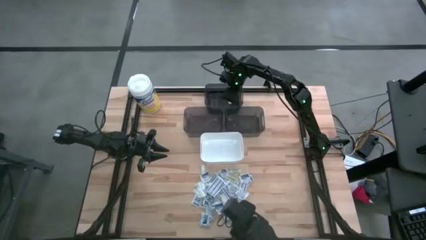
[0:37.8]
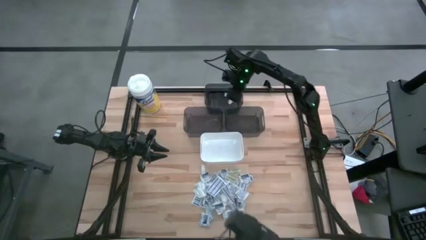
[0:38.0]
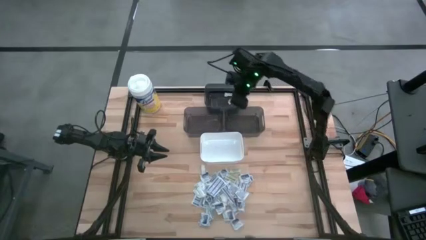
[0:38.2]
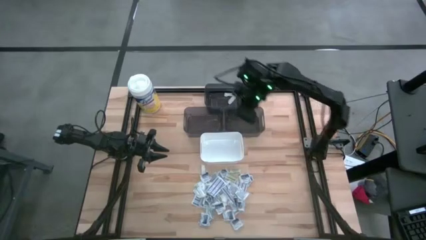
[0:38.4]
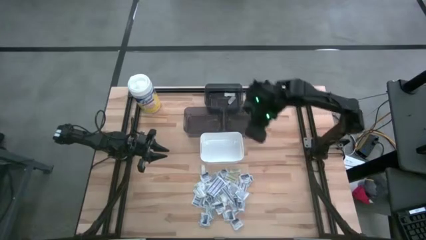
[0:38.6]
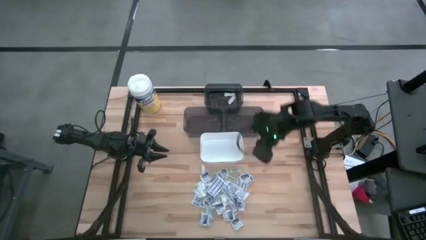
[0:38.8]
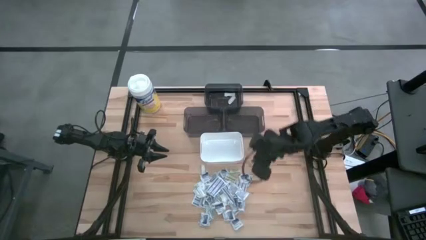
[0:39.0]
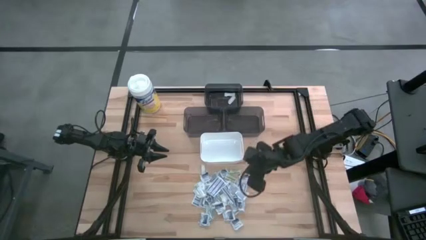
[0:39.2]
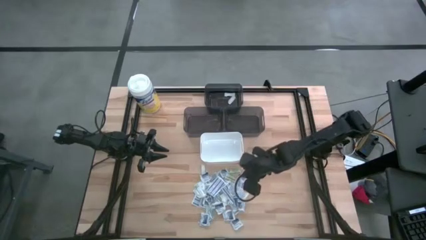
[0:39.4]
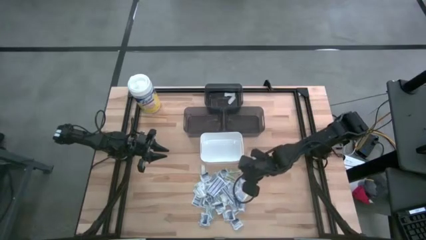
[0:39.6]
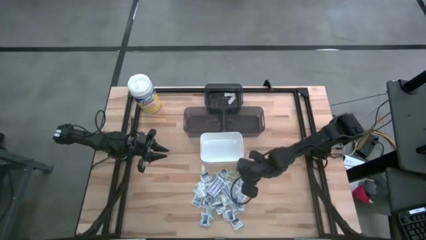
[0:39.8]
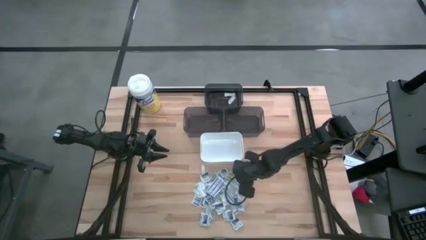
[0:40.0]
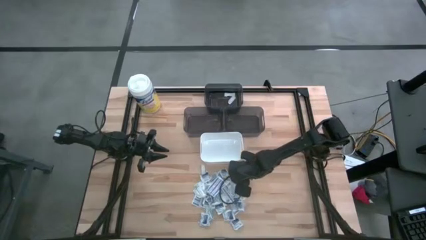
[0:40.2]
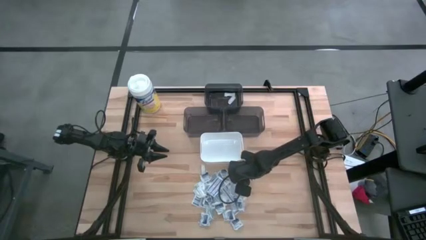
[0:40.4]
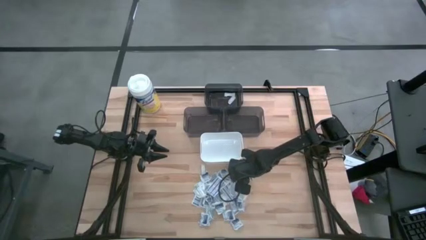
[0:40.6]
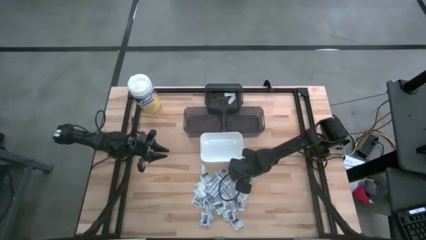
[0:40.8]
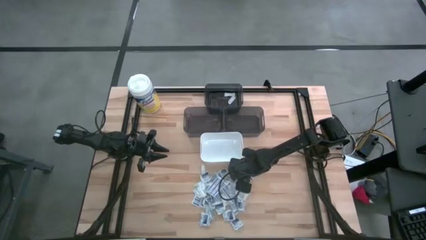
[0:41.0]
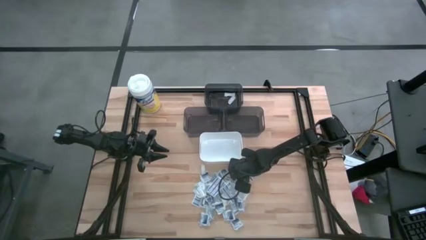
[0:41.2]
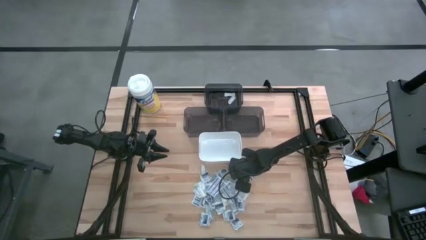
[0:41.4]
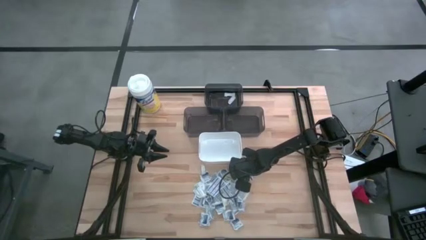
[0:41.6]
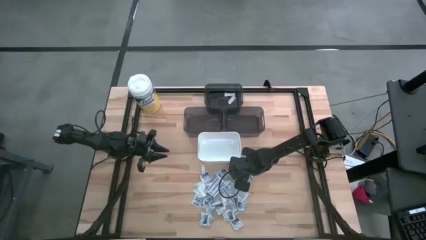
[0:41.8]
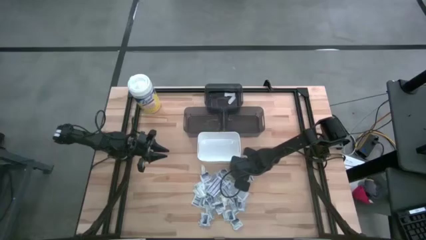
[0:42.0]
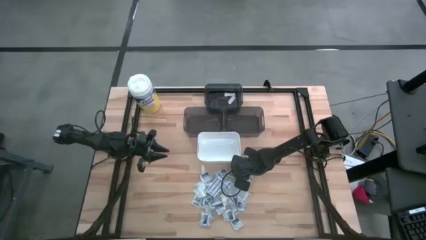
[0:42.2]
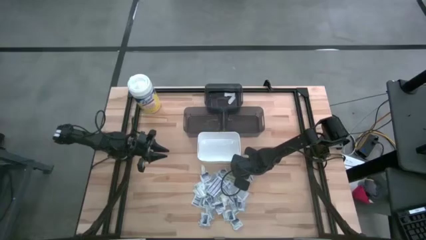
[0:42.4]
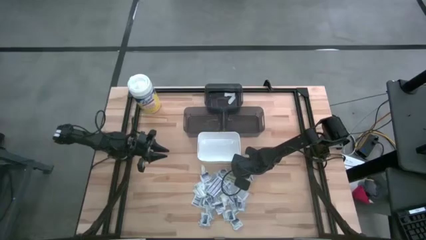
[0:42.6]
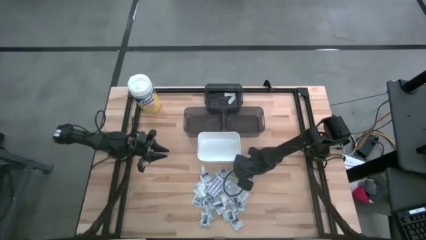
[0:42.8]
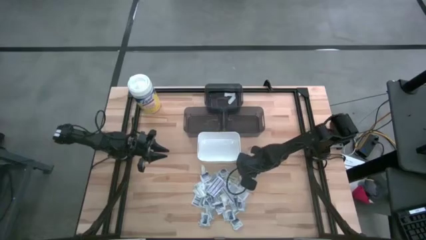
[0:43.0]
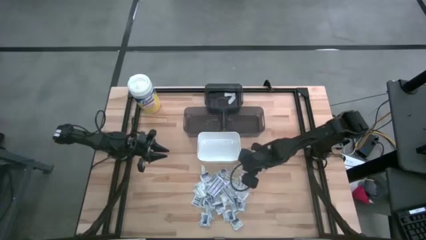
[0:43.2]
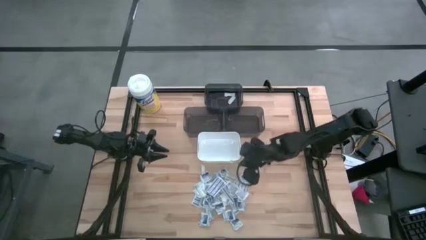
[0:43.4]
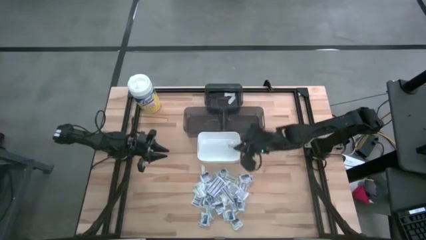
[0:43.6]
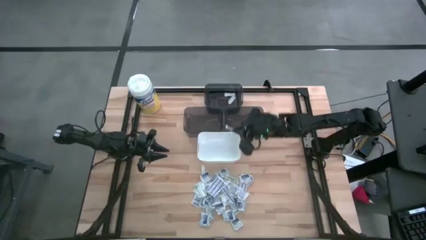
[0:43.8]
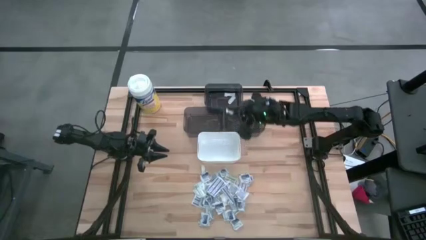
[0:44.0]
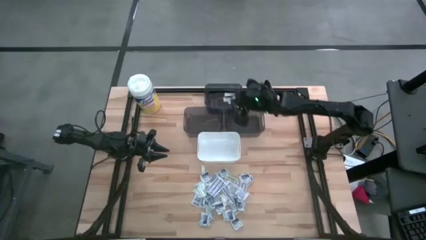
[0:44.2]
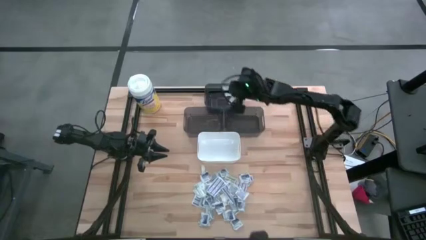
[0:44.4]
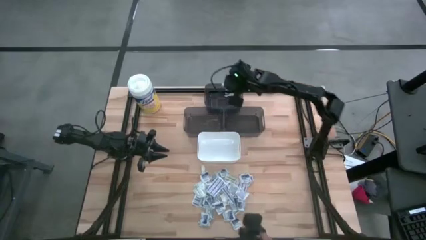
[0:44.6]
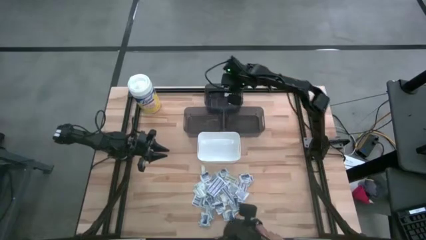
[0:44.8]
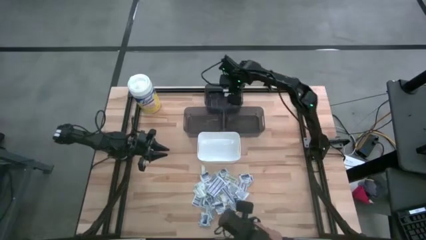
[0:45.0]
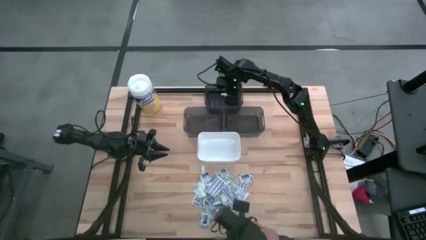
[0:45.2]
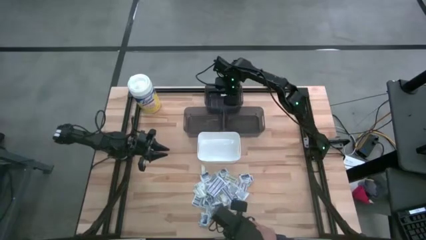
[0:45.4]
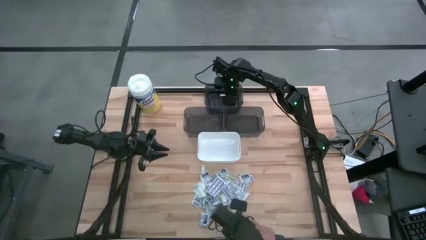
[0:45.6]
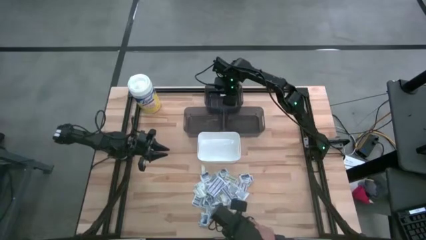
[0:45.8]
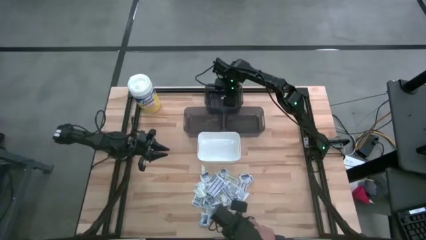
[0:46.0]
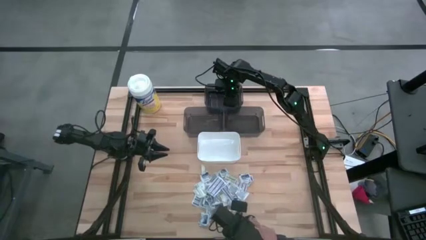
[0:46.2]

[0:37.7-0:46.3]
Task: Pick & Place First Aid Supplies
Put the green bandage into the top black bin

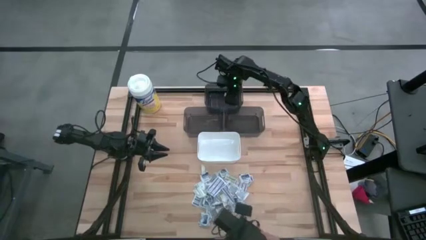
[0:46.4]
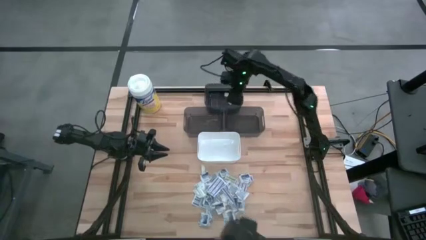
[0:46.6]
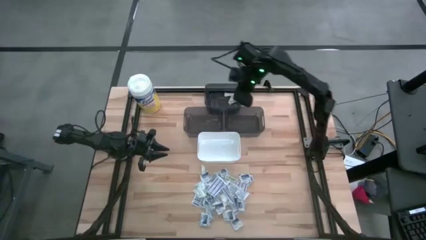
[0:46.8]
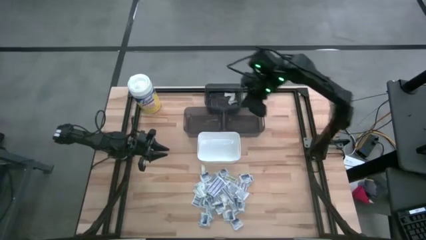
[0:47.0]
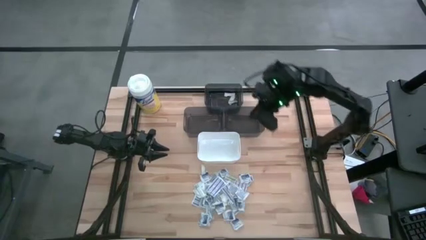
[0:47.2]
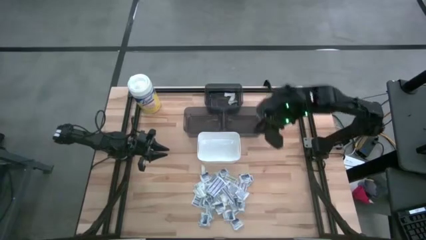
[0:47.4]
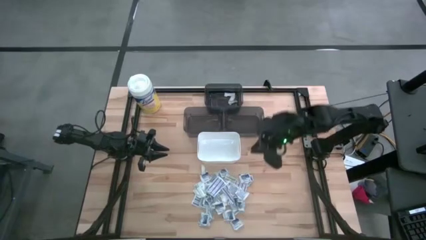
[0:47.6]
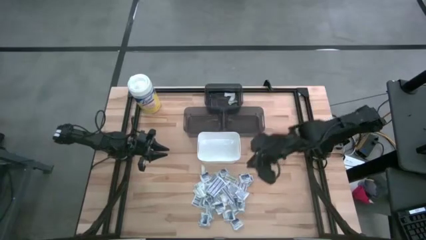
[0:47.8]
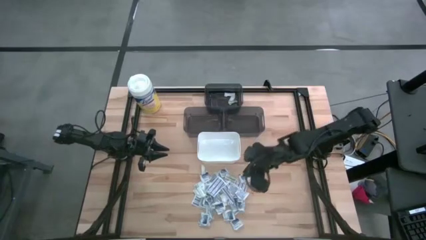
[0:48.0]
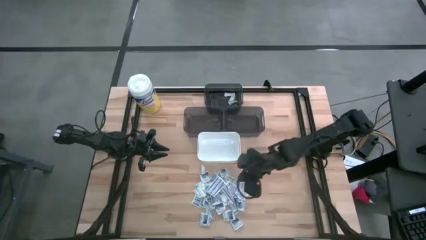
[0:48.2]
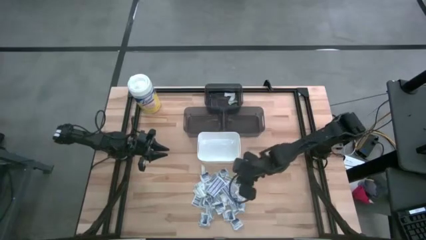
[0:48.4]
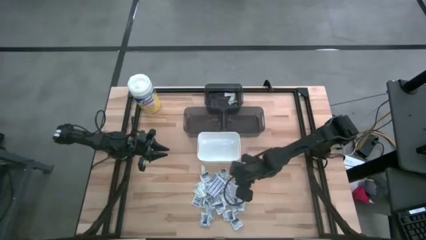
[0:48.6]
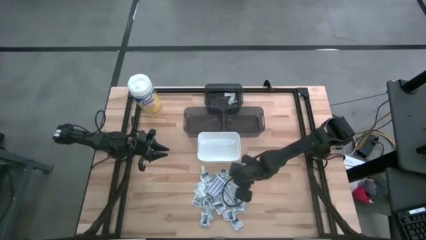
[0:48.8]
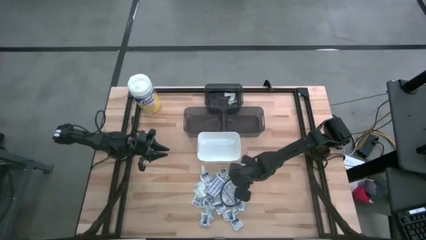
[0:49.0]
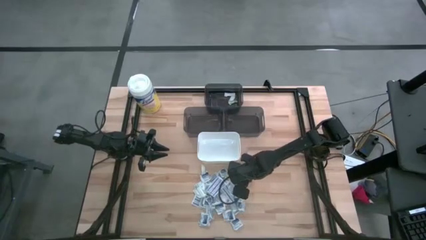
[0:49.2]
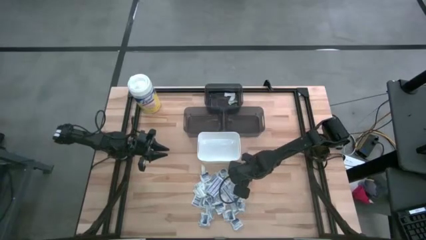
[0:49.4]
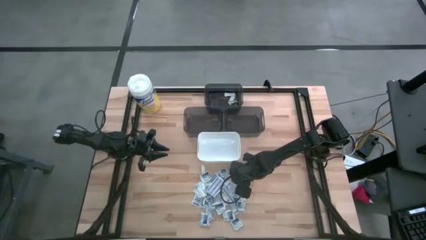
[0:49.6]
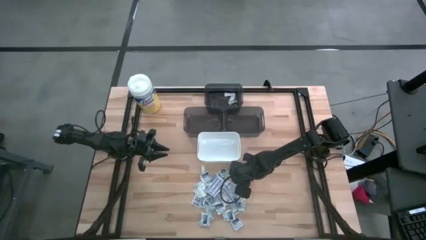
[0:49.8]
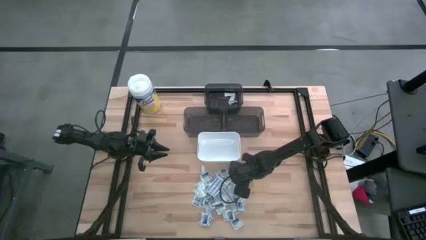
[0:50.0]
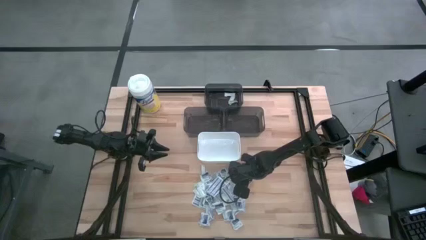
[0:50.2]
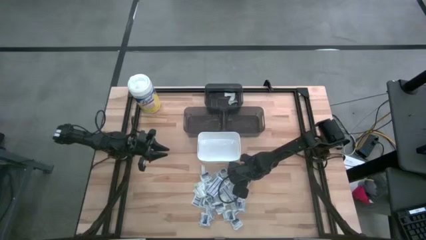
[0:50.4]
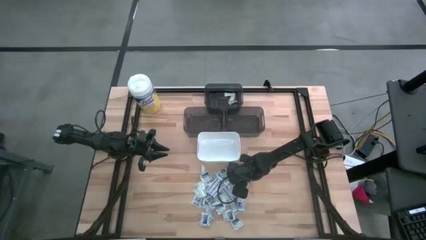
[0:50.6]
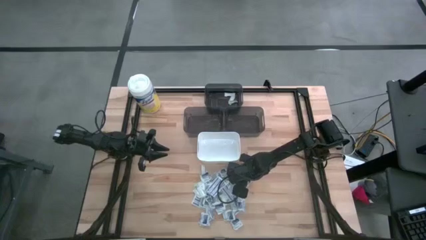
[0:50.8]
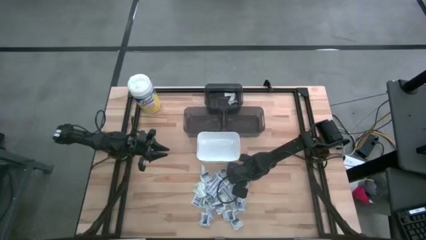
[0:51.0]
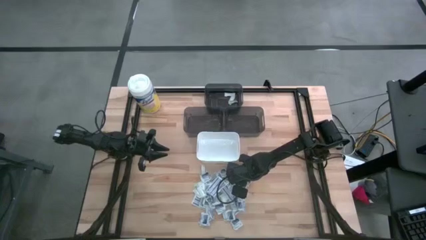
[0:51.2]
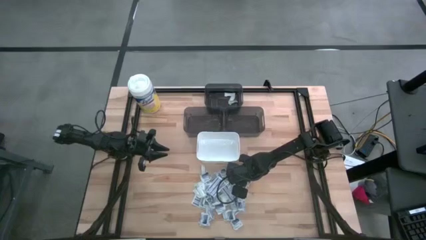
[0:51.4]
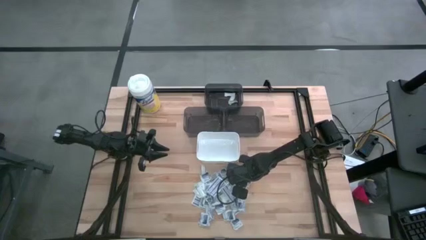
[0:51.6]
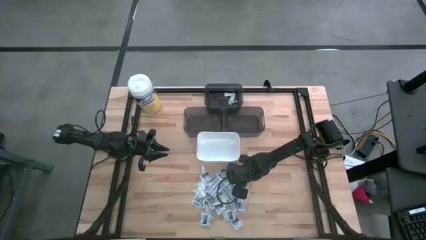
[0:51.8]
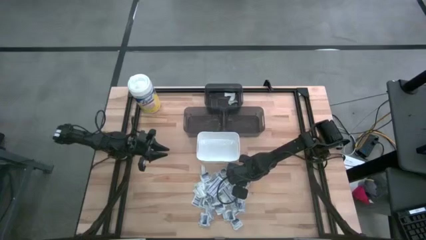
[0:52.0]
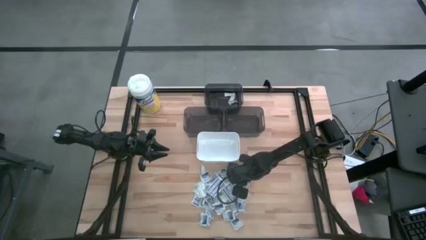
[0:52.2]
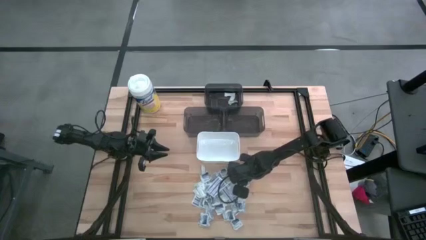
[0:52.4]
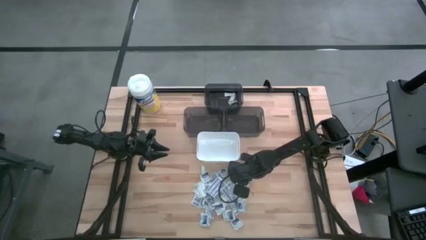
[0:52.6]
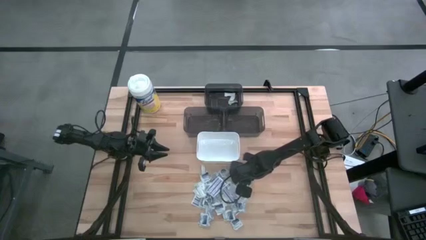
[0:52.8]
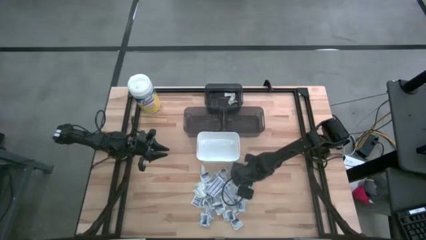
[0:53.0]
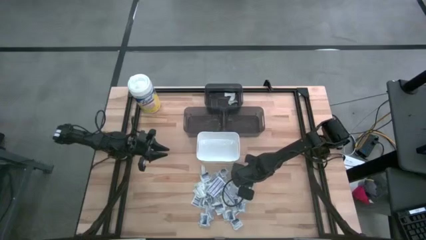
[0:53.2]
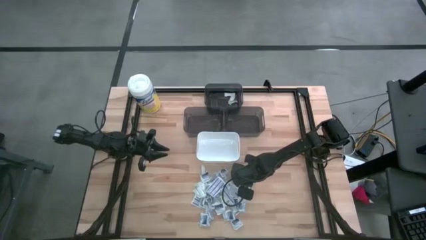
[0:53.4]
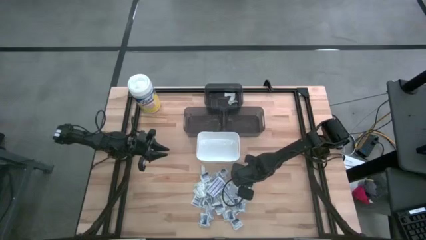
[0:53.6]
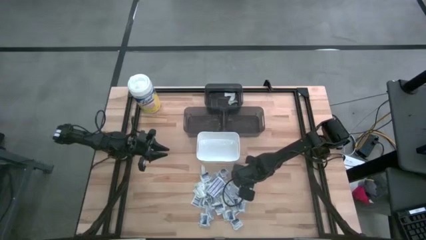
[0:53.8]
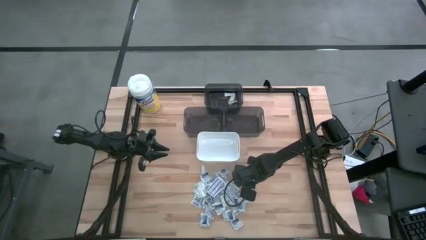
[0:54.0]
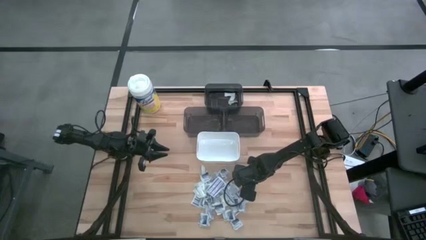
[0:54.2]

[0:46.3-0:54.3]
Put the green bandage into the top black bin
